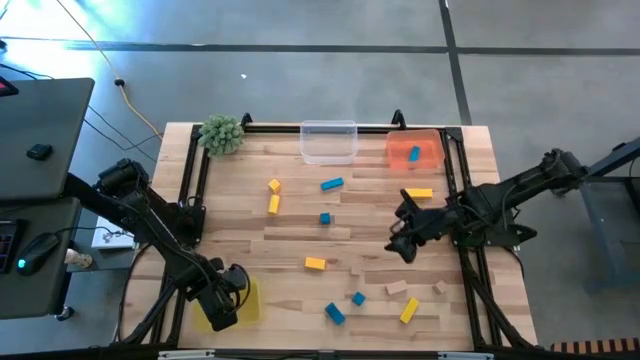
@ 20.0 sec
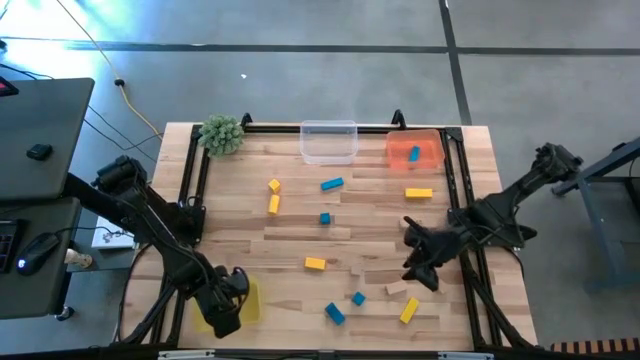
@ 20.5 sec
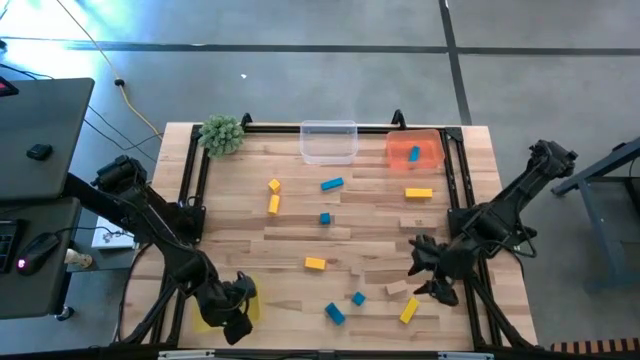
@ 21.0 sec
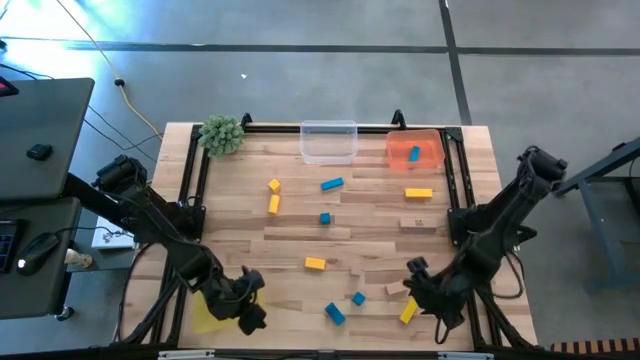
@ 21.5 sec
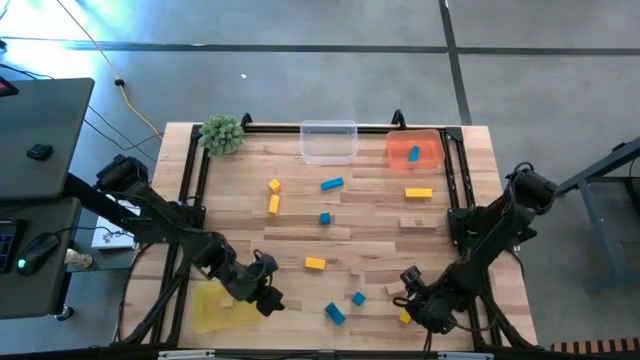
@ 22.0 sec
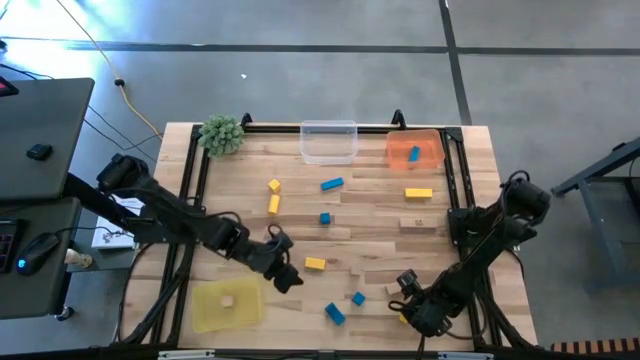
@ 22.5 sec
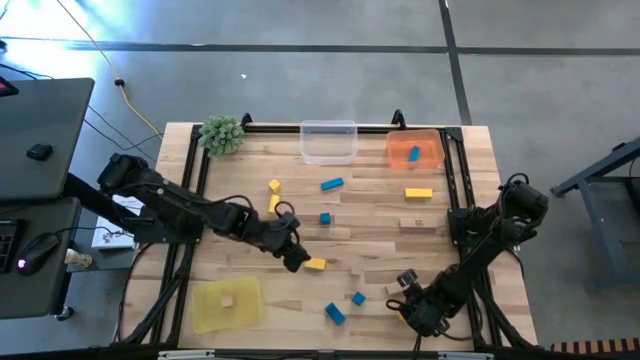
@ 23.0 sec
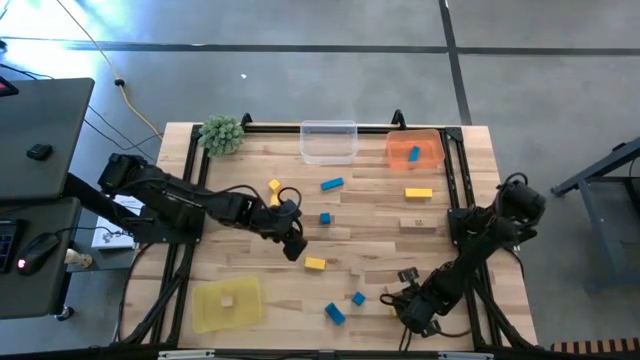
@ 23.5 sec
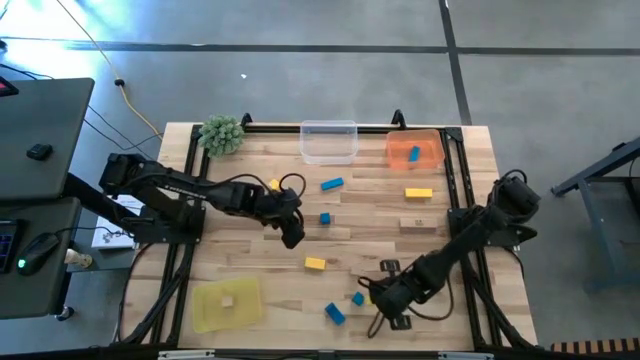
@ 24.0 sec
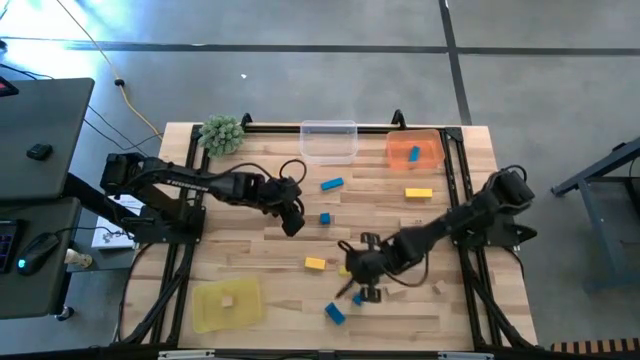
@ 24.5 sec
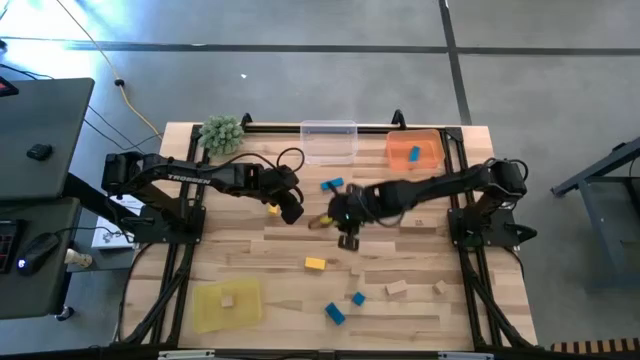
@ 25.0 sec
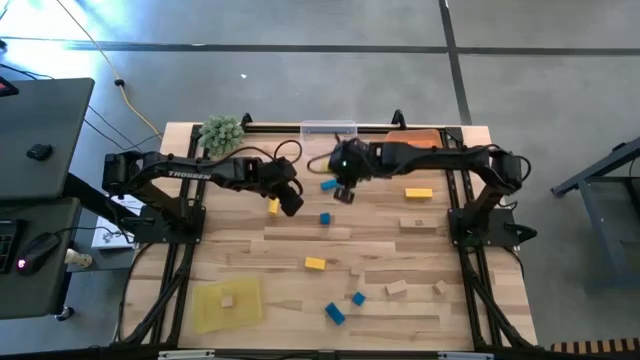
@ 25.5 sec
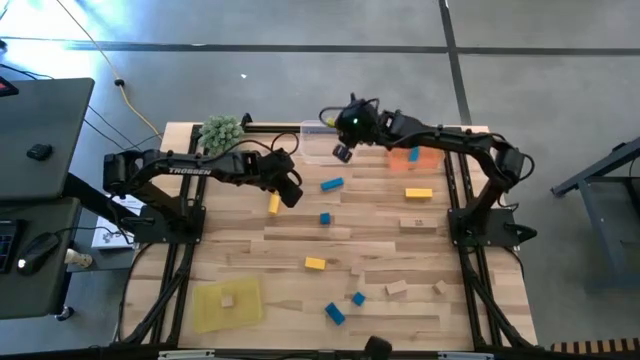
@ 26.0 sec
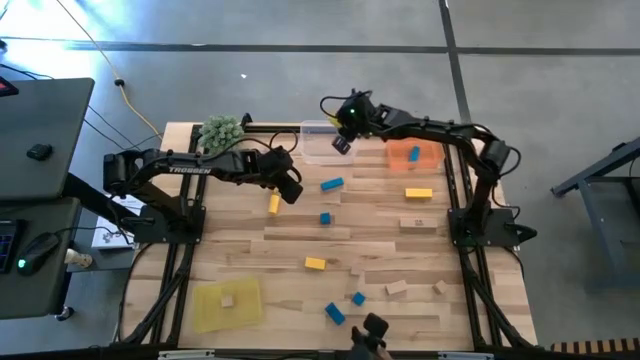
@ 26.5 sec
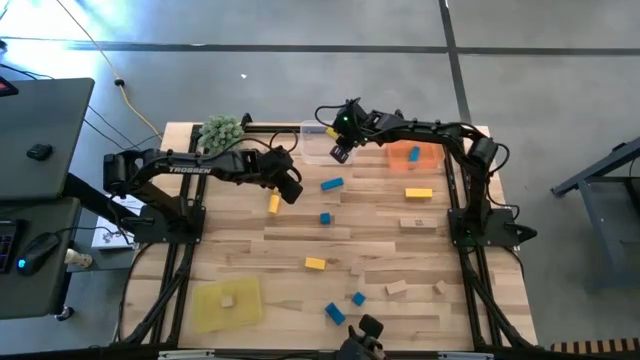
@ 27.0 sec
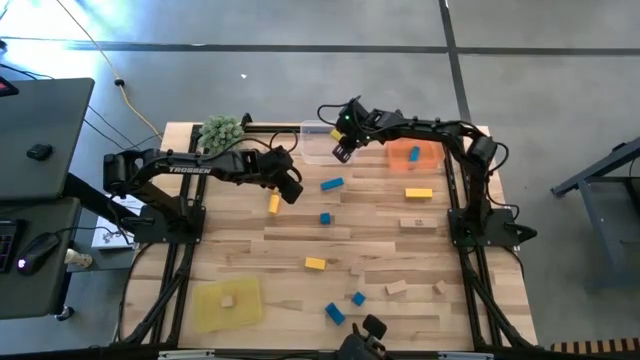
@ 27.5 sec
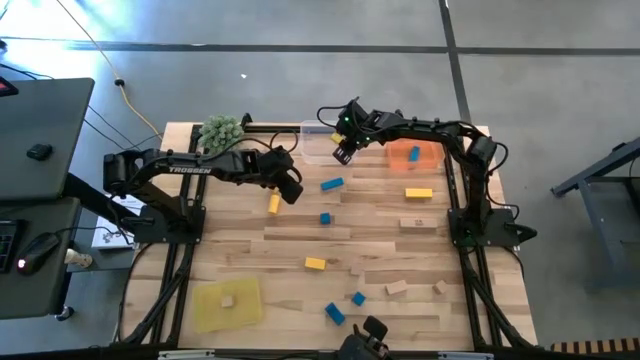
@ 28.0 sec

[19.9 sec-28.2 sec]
Task: Sort & place blocks by color
Put the yellow block into the transparent bin

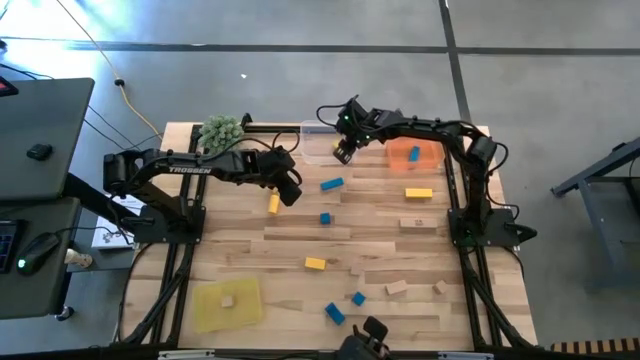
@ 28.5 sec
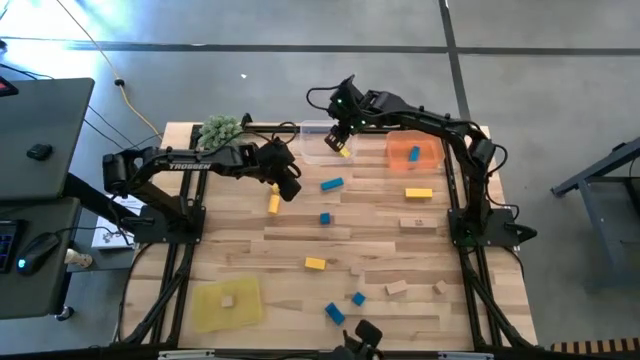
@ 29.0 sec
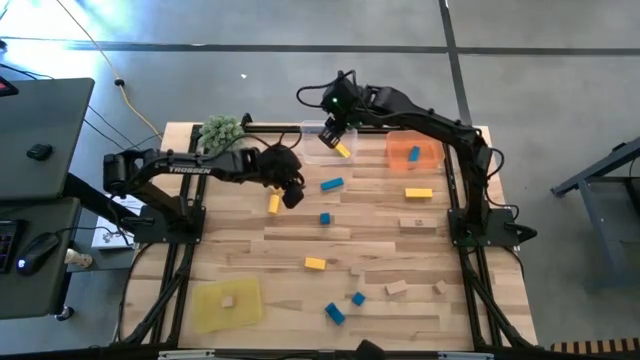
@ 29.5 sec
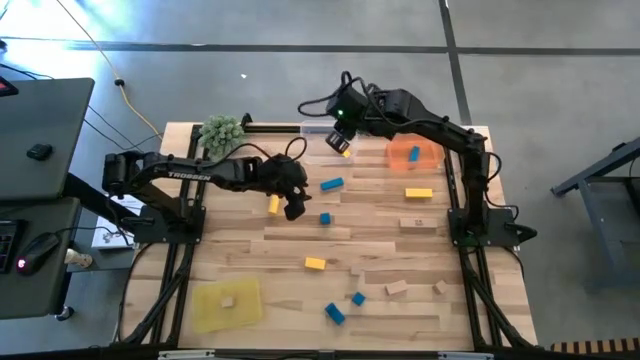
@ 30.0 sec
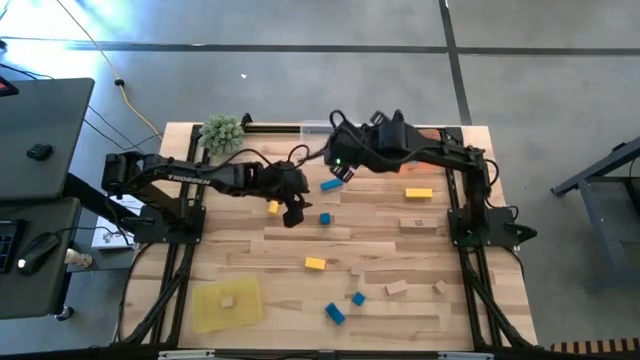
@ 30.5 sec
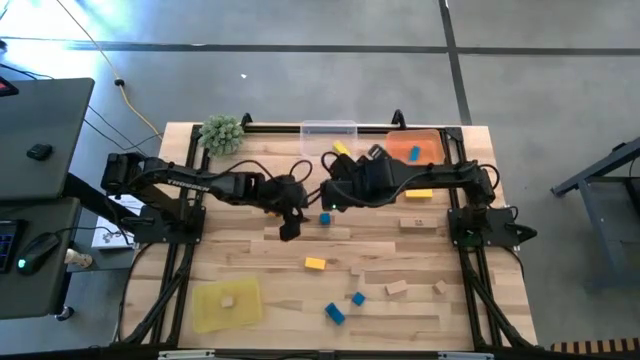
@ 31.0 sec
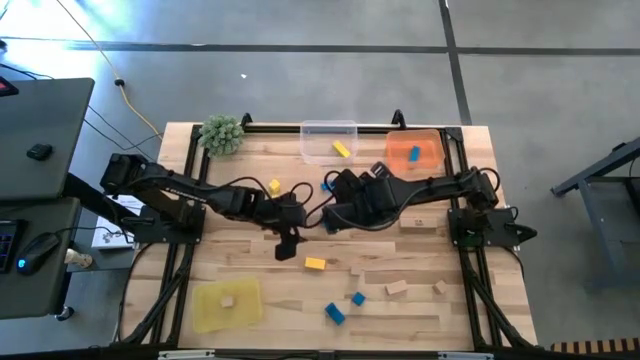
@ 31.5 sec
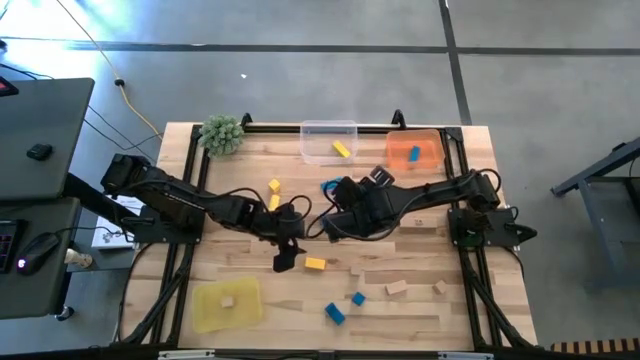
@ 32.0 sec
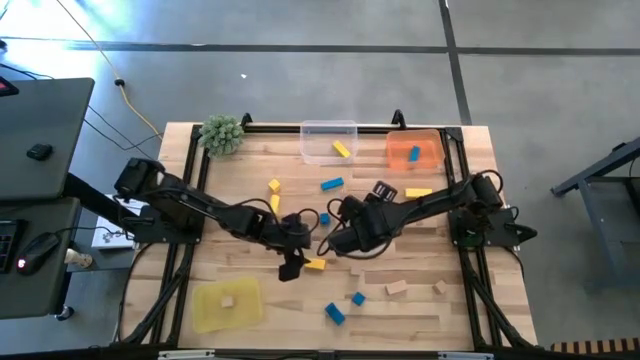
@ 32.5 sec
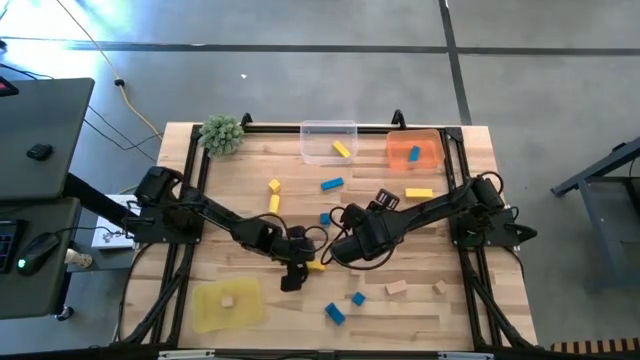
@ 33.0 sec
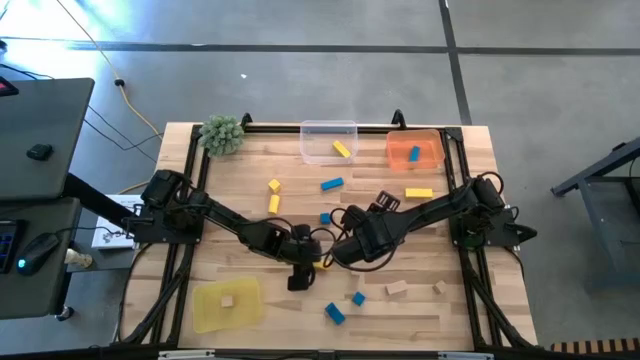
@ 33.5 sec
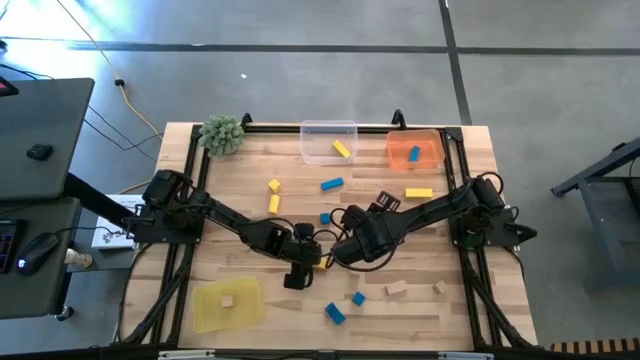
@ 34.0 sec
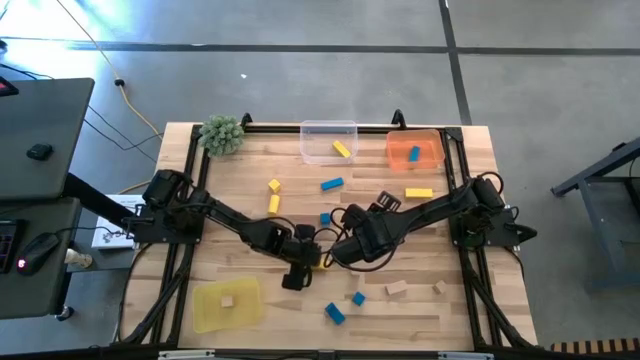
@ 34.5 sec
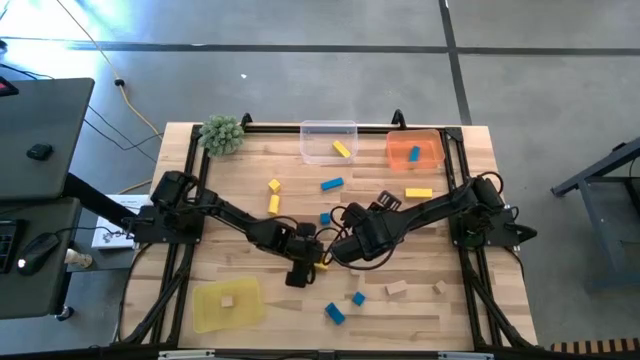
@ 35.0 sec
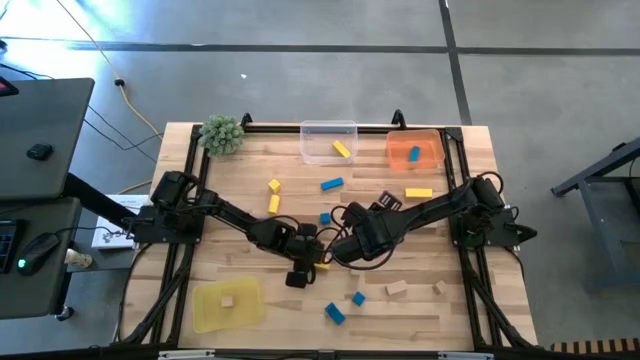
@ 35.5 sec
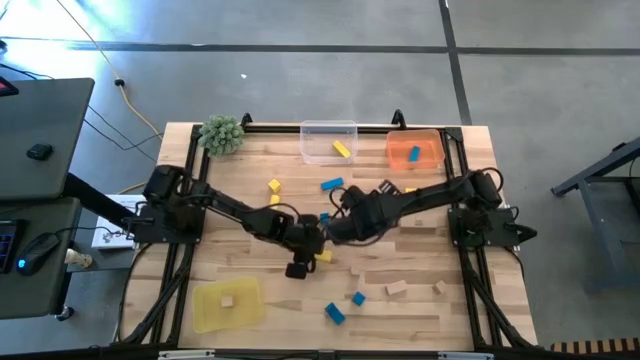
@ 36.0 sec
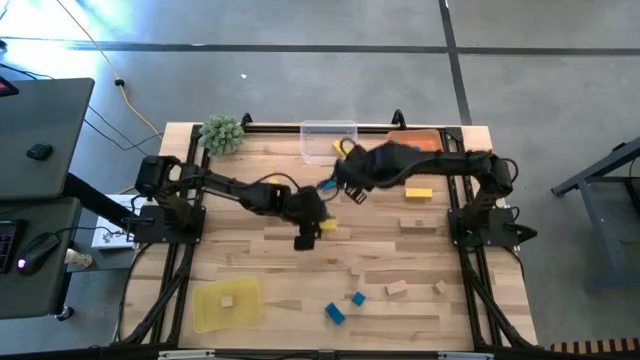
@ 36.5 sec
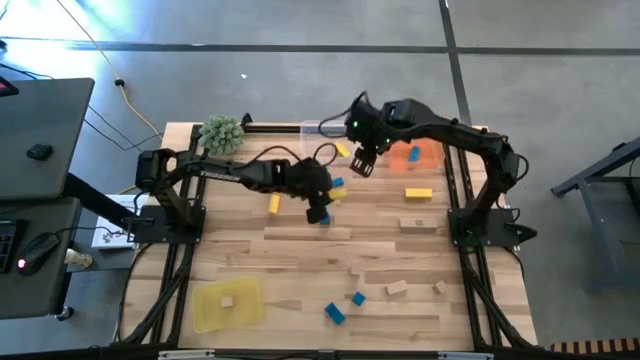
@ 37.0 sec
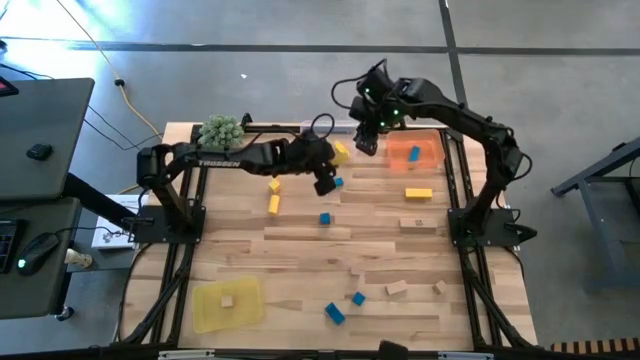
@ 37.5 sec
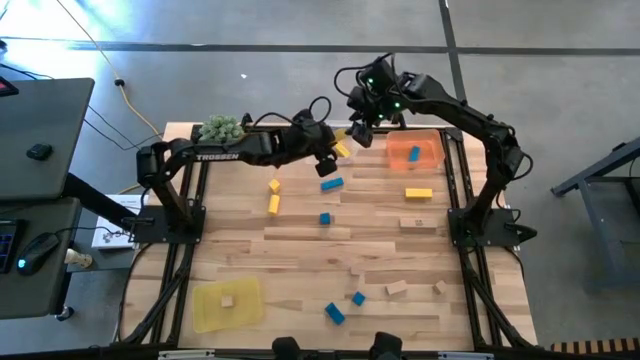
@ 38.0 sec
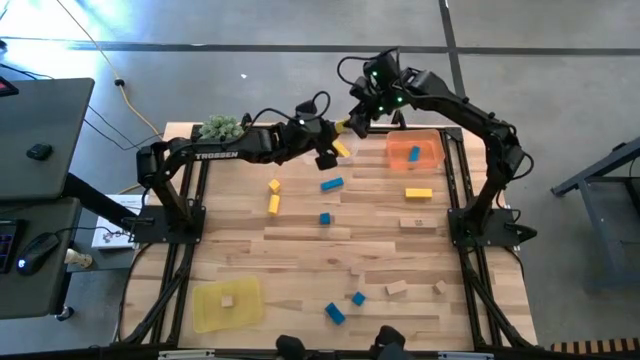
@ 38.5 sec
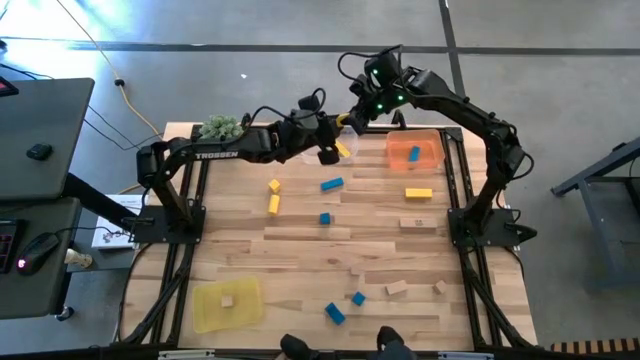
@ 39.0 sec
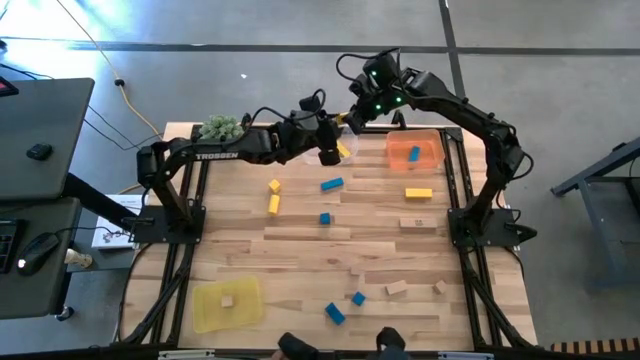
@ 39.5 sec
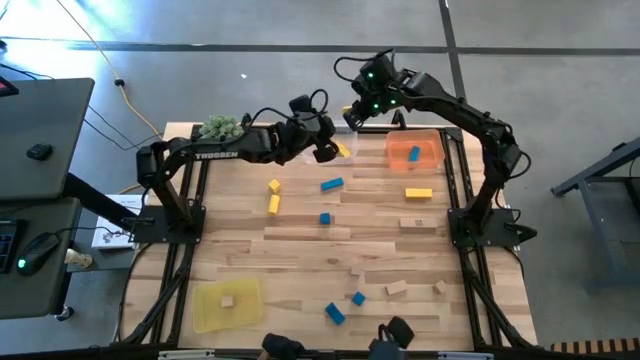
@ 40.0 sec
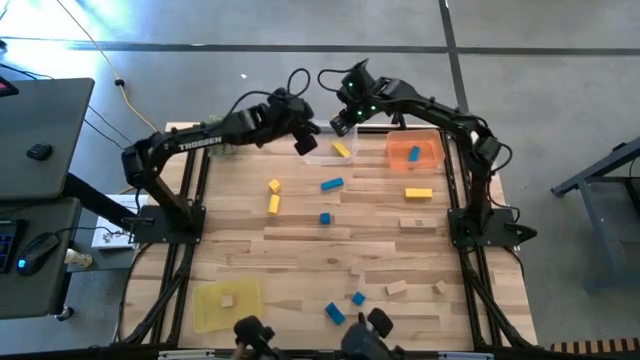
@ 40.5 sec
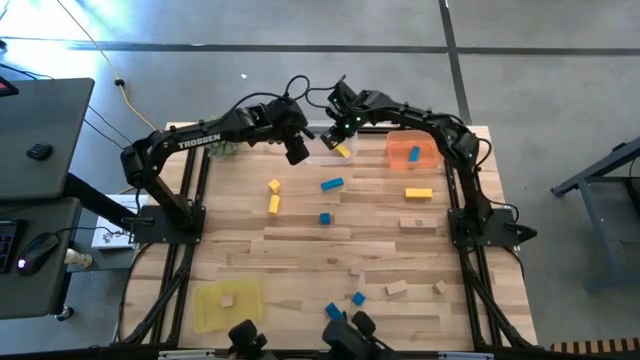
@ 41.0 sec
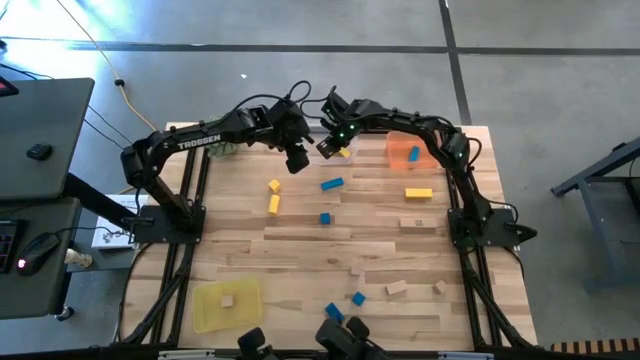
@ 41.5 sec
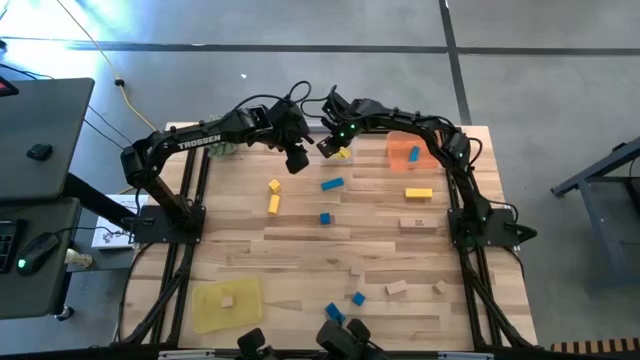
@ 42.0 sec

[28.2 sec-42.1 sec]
Put the yellow block into the transparent bin
